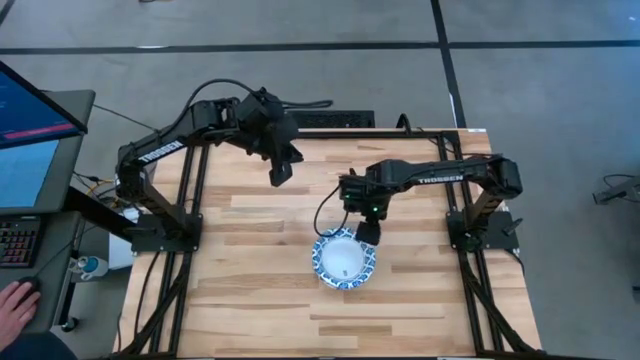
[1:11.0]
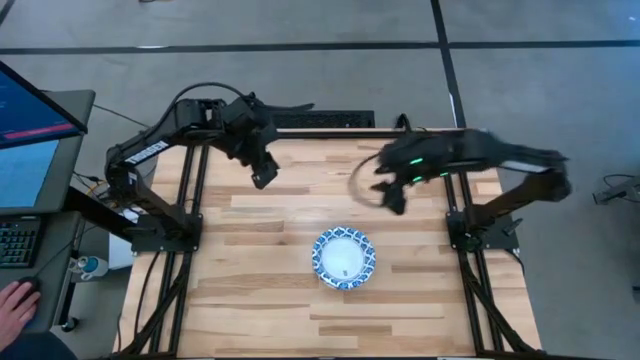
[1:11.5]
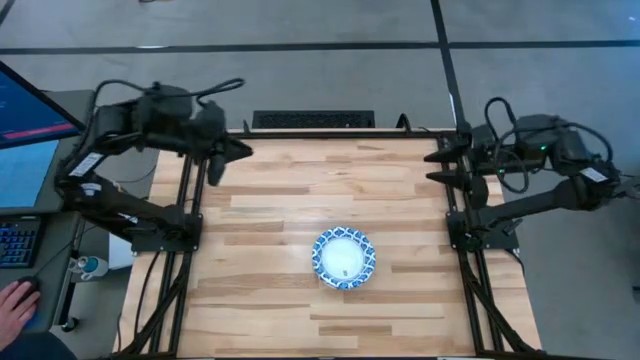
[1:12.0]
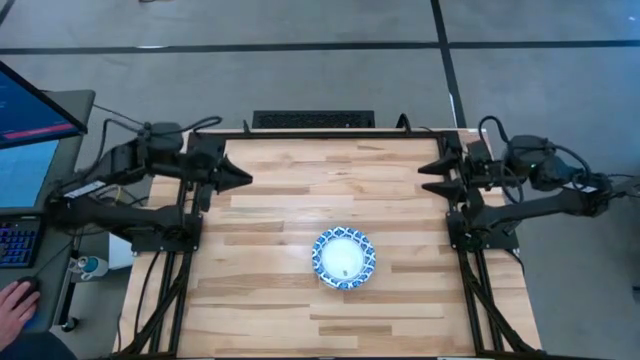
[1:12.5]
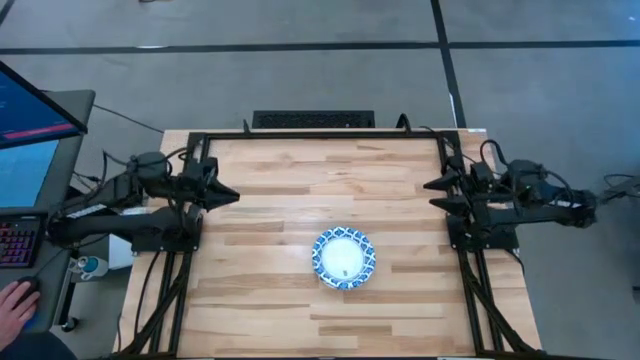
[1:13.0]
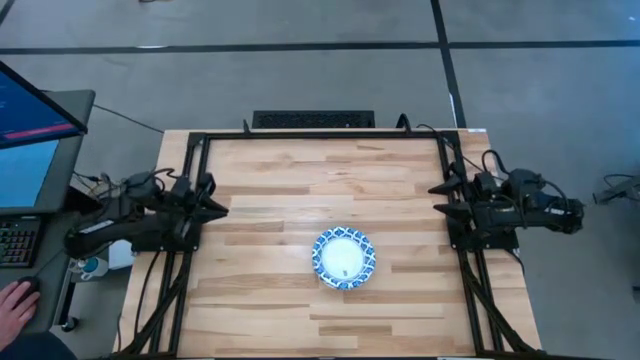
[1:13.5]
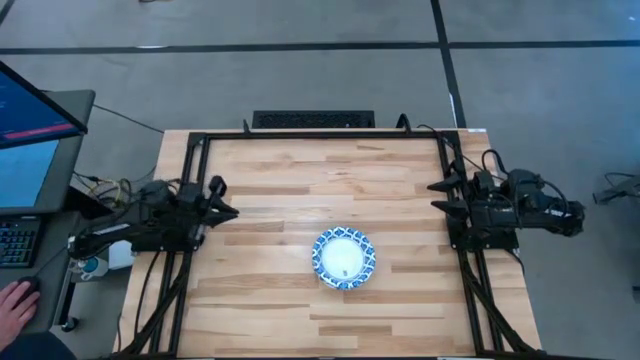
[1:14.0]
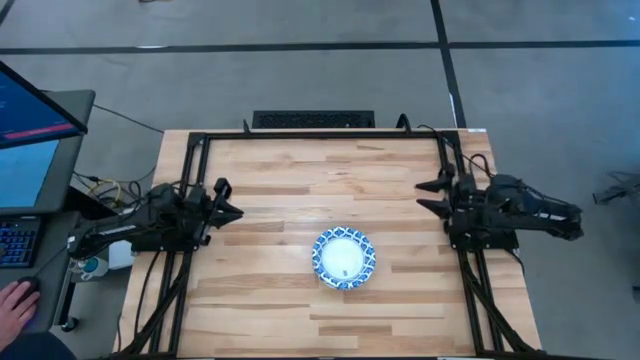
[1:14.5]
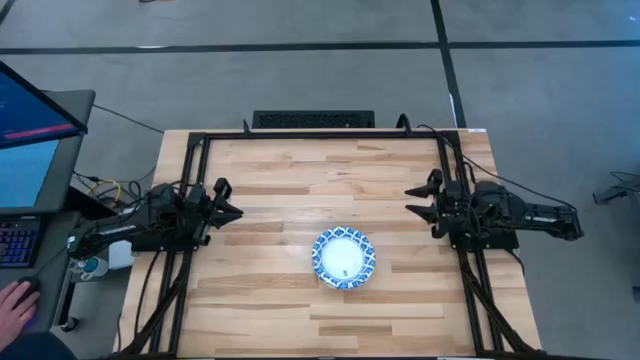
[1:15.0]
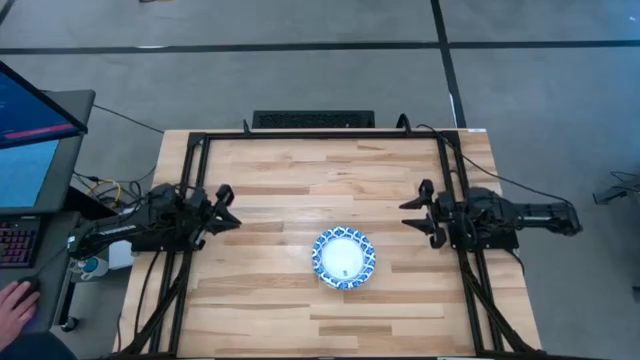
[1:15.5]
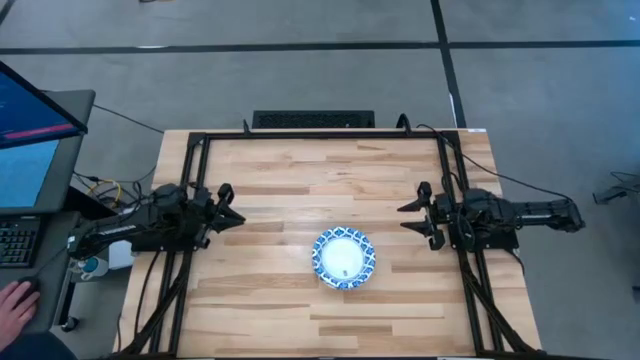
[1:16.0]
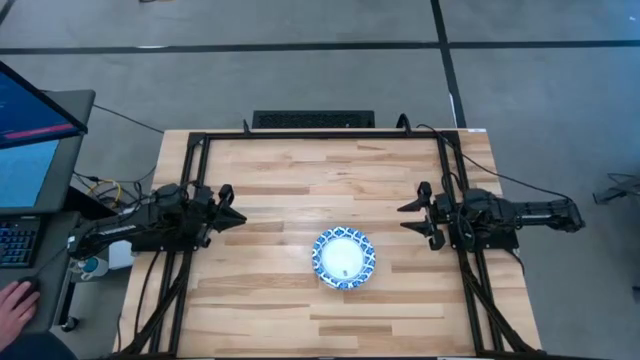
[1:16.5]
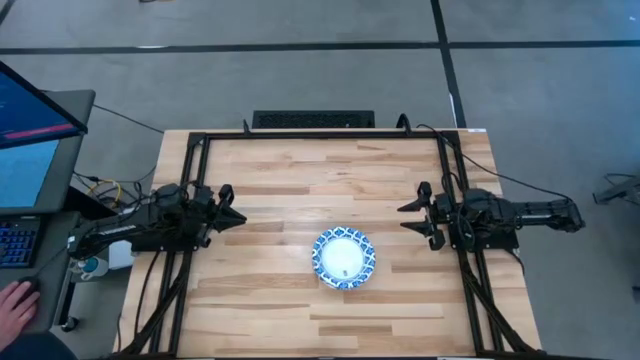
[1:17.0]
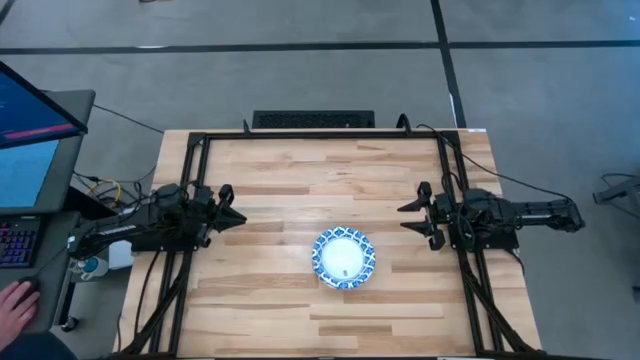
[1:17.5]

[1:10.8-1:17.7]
Task: Nest bowls inside each other
Return to Home Position

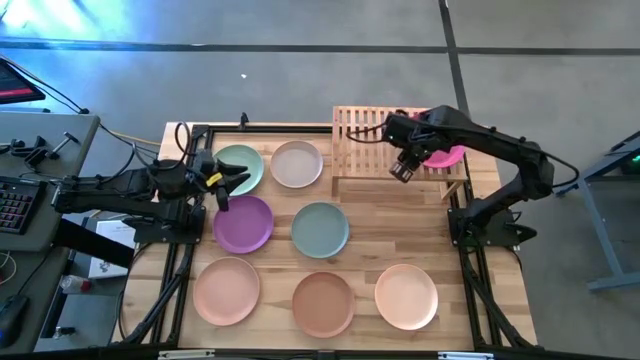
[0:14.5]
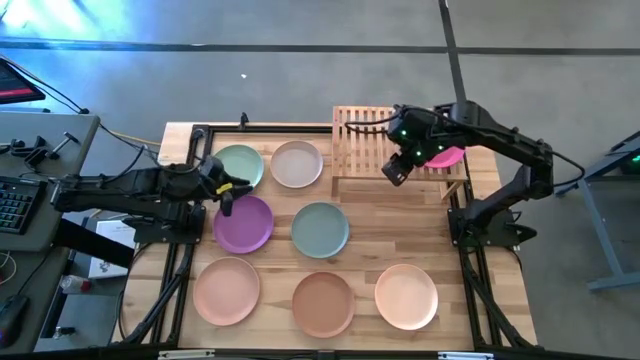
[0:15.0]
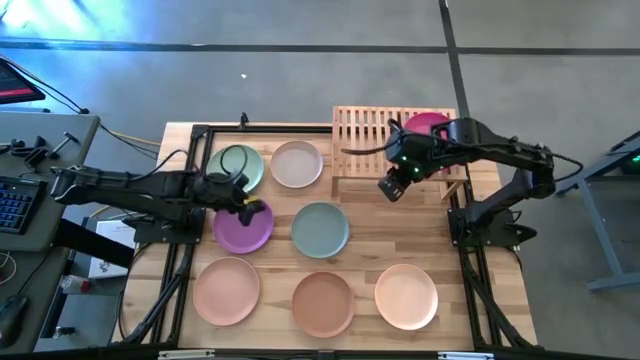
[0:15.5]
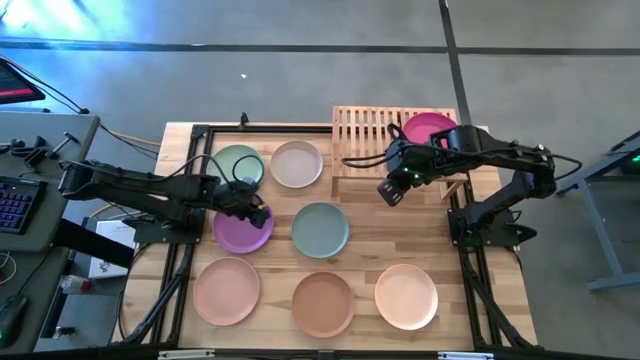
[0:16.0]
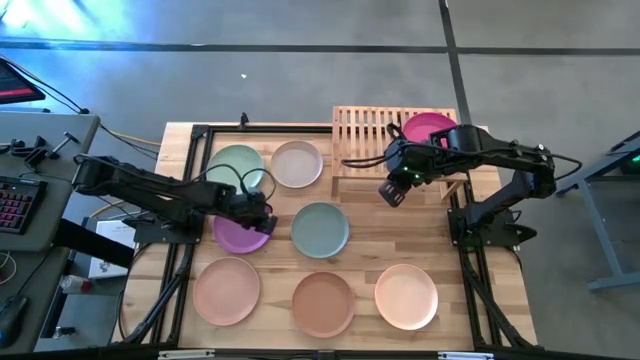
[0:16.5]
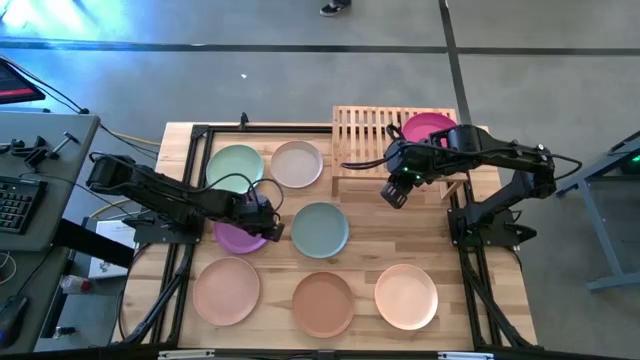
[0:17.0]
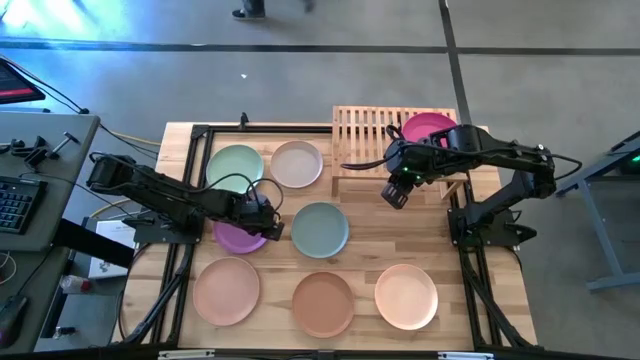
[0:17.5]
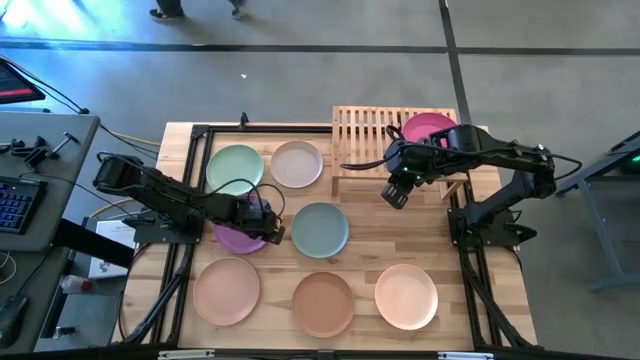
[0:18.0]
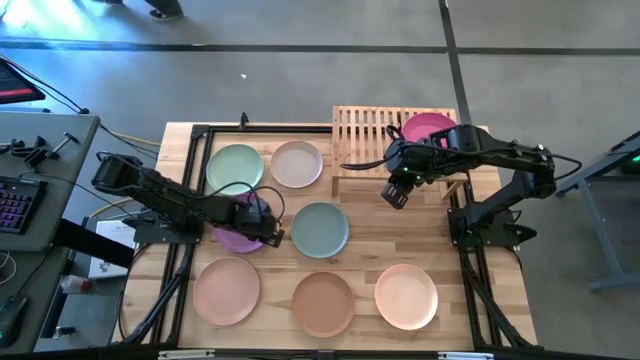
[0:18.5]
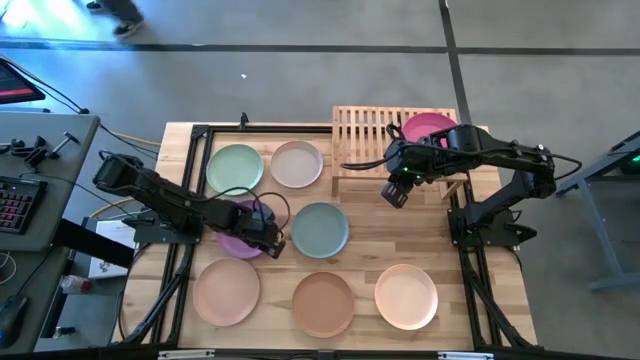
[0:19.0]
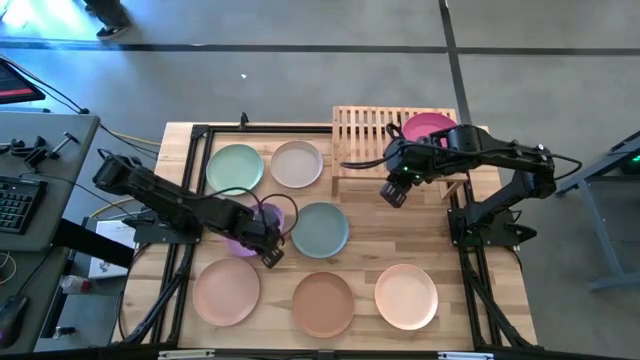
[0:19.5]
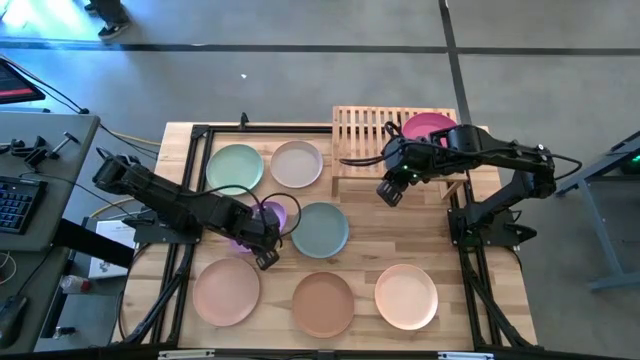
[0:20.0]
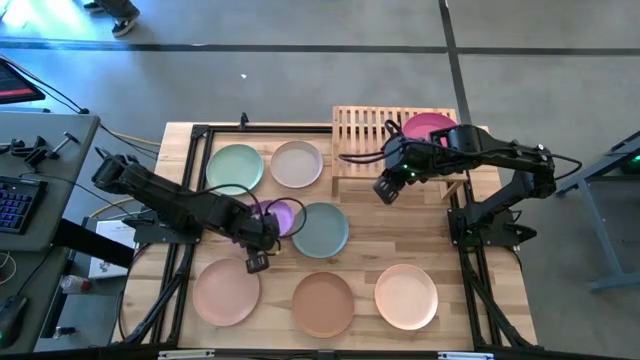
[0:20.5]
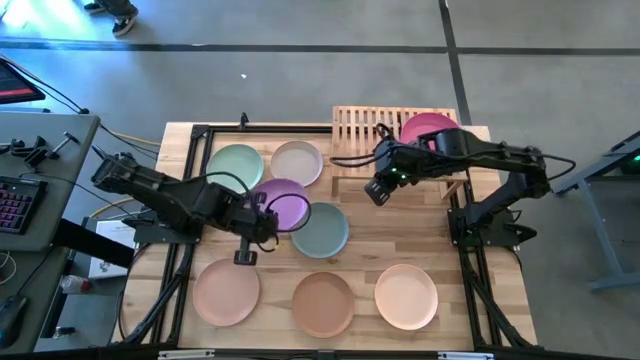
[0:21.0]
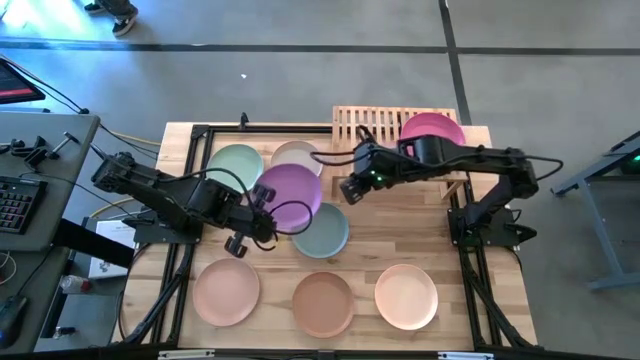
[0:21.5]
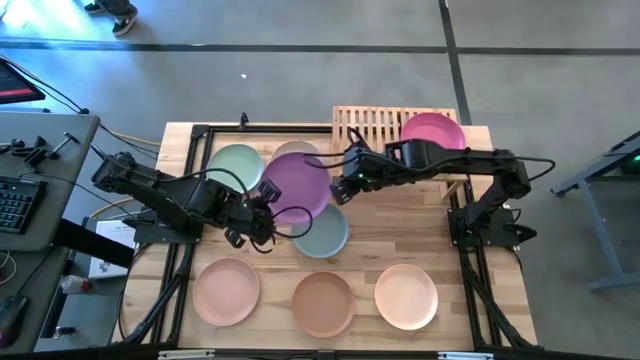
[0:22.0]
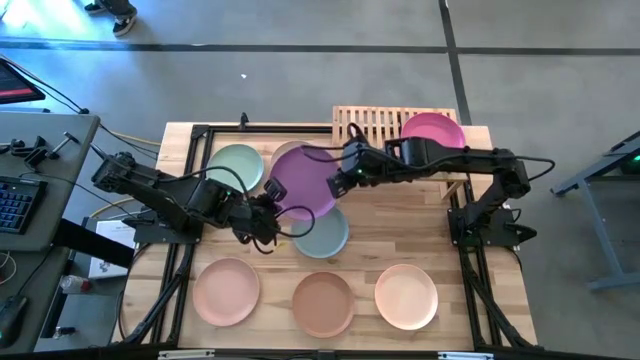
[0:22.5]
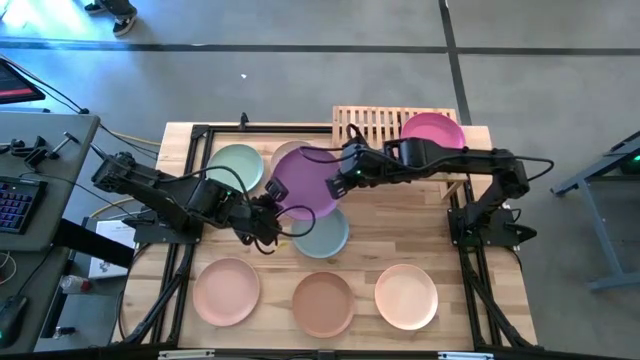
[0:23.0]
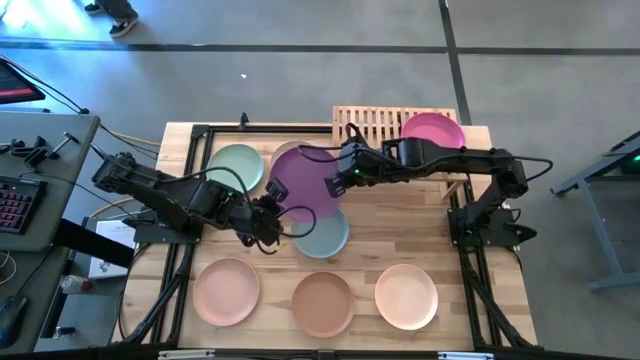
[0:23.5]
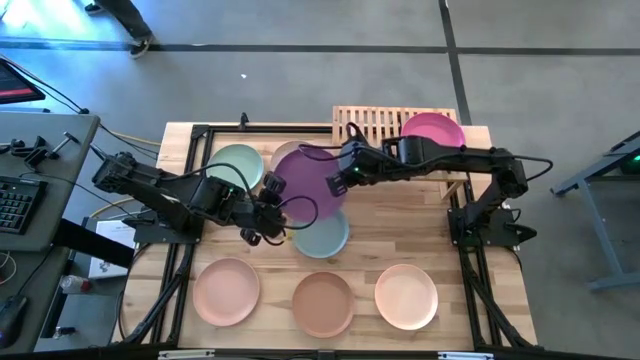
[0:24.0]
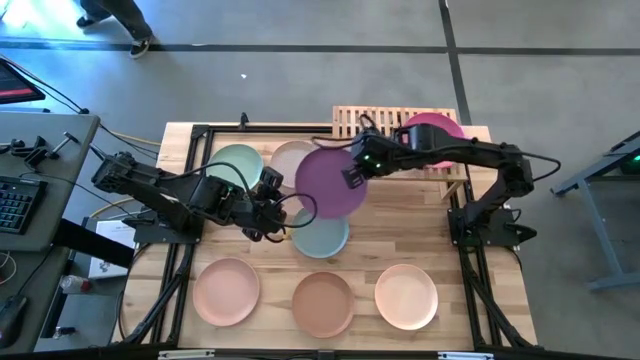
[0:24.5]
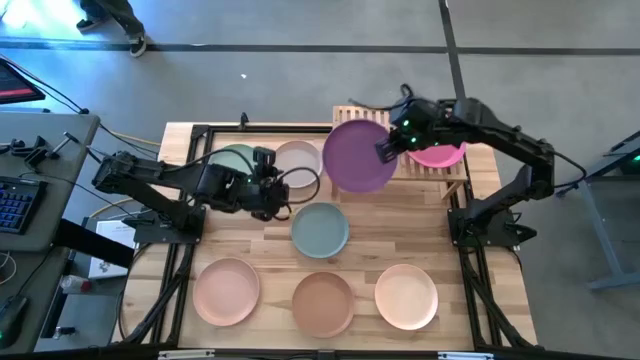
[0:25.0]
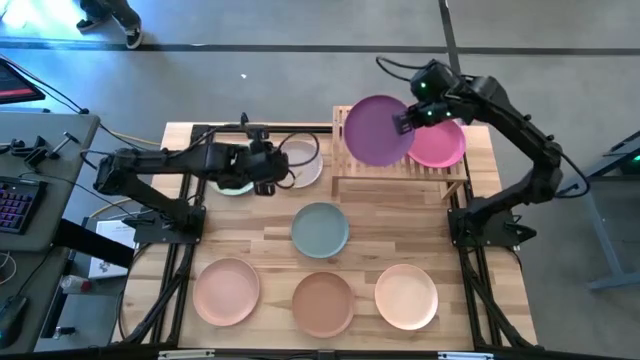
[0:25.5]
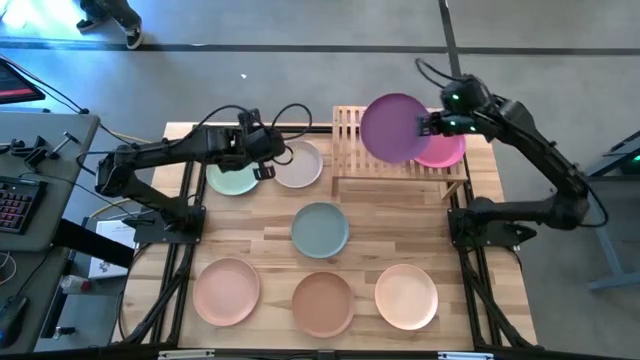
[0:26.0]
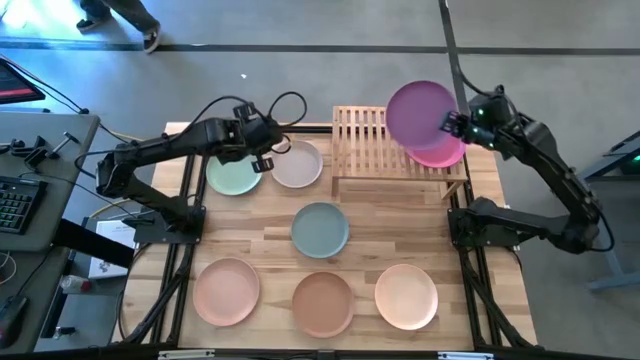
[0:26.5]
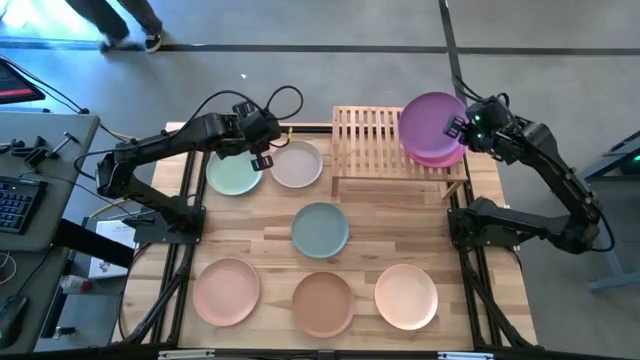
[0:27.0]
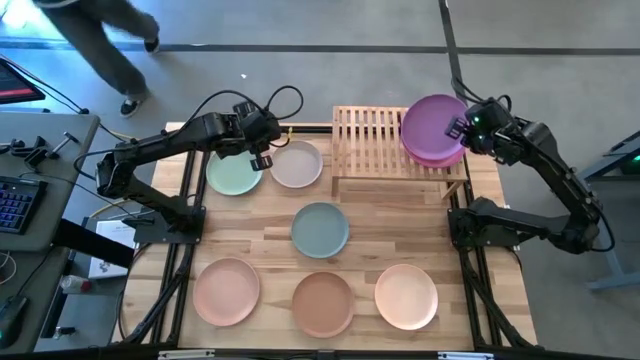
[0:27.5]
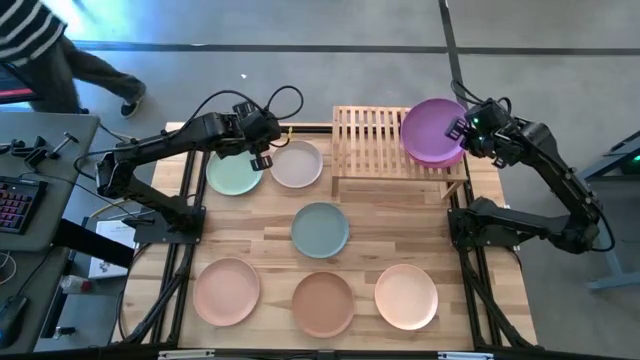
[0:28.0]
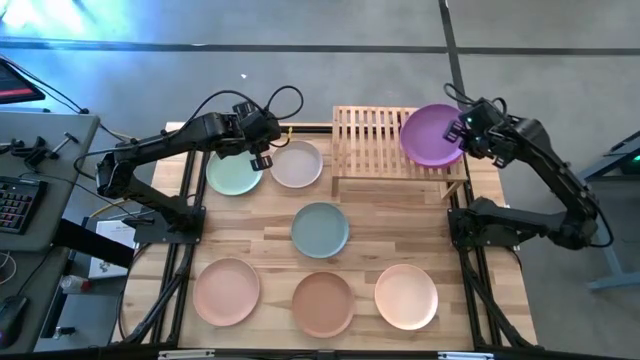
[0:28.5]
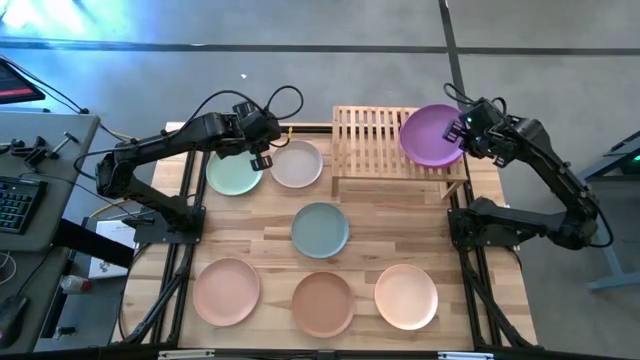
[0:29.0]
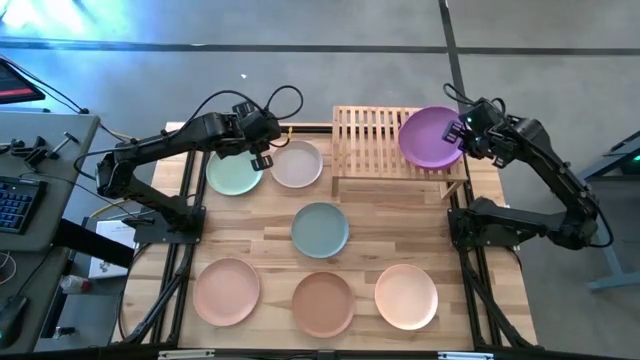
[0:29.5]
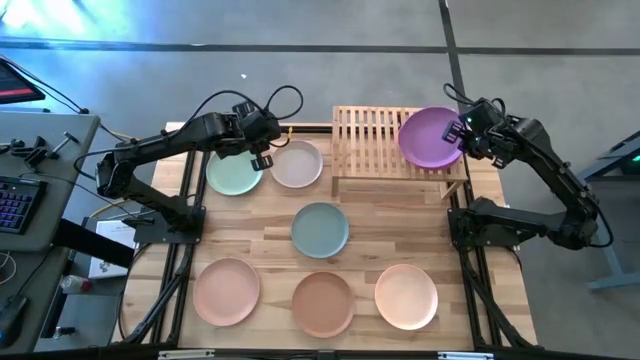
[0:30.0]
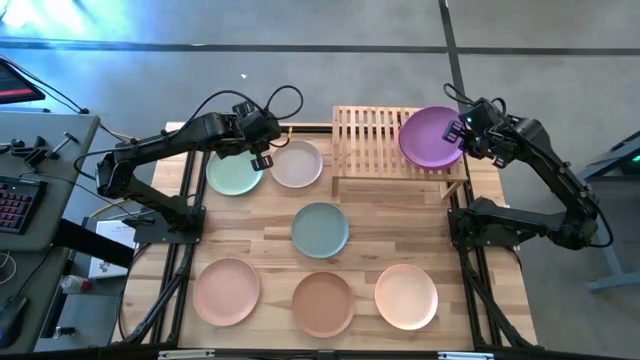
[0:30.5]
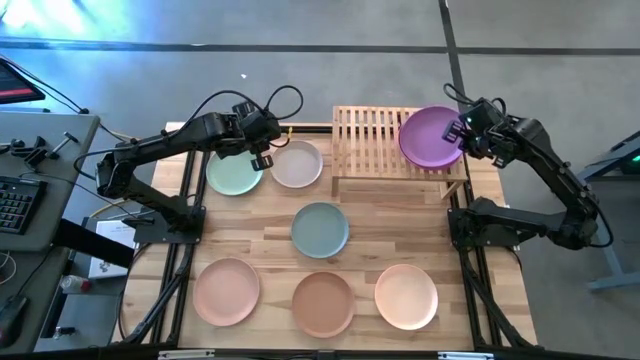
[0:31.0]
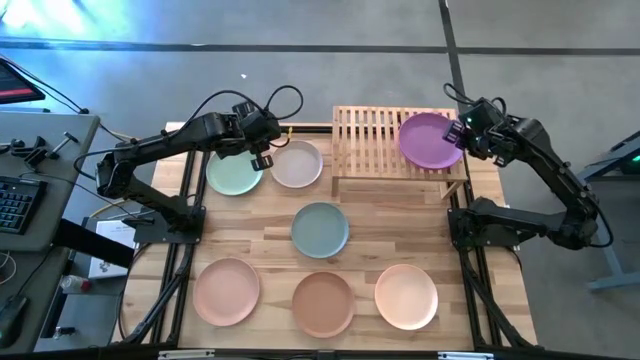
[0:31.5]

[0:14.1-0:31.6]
Task: Place and stack plates onto a shelf
Stack the purple plate on the pink plate on the shelf
